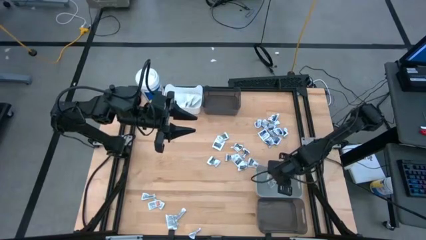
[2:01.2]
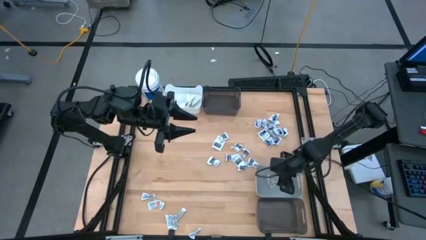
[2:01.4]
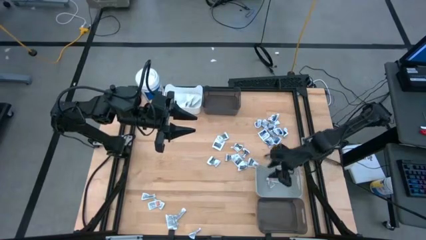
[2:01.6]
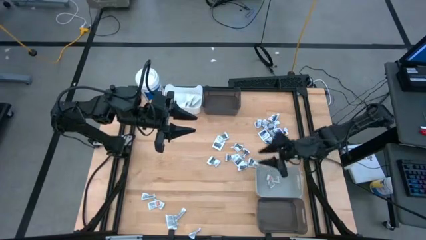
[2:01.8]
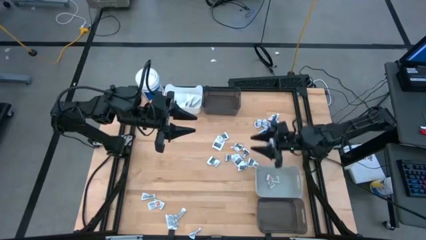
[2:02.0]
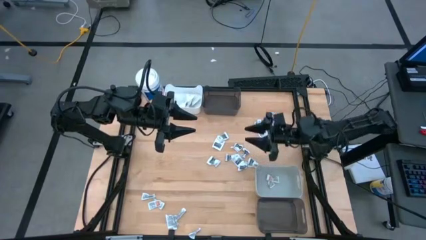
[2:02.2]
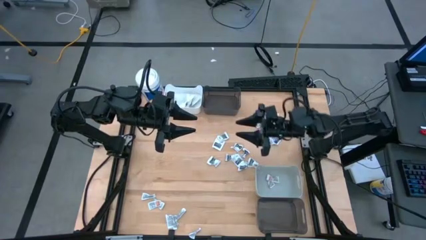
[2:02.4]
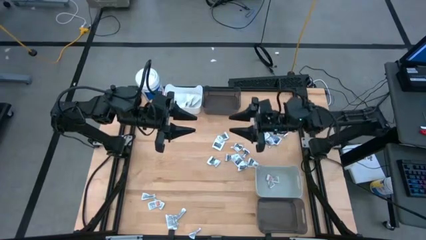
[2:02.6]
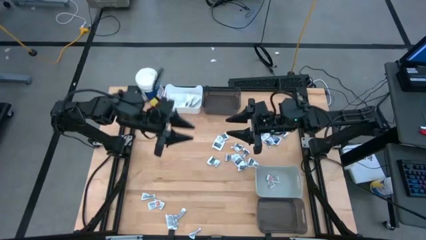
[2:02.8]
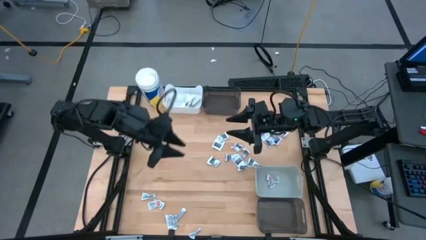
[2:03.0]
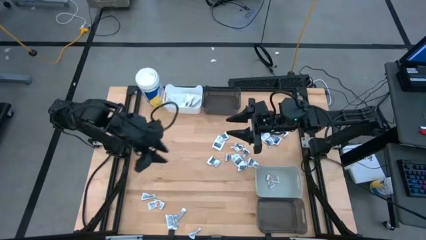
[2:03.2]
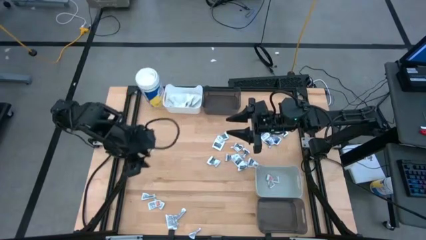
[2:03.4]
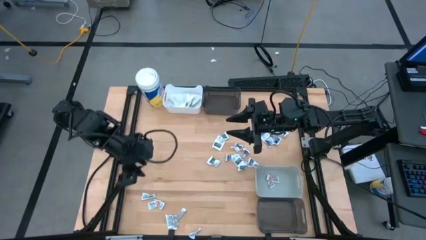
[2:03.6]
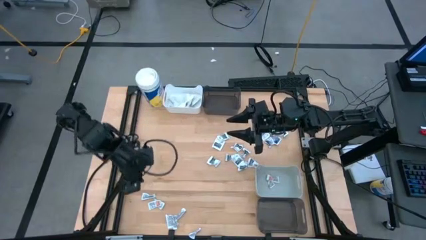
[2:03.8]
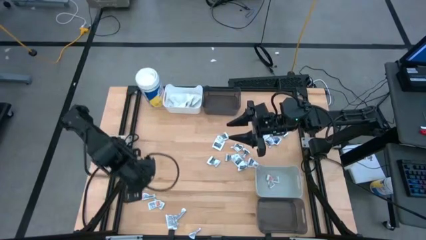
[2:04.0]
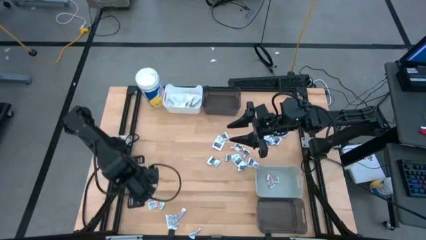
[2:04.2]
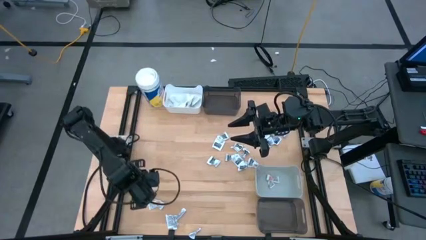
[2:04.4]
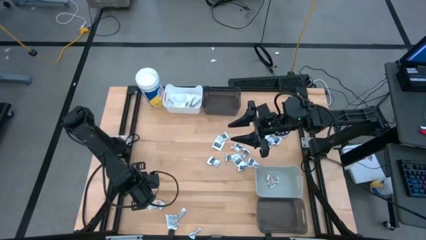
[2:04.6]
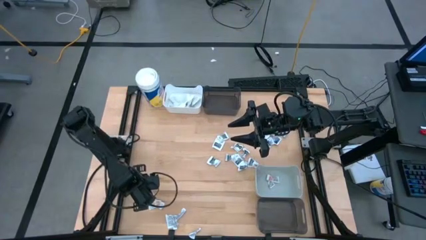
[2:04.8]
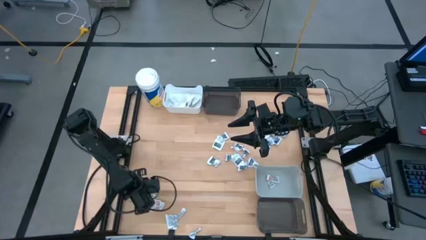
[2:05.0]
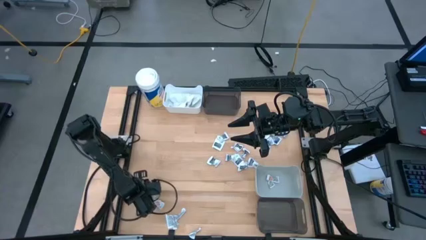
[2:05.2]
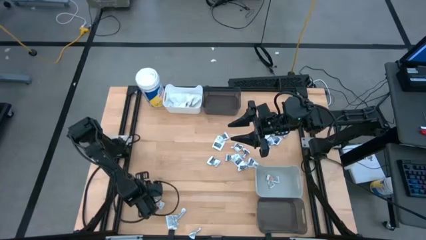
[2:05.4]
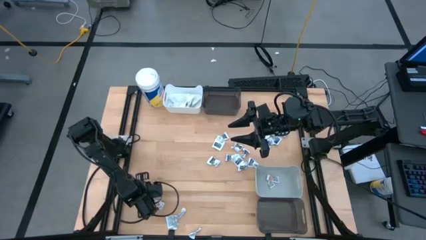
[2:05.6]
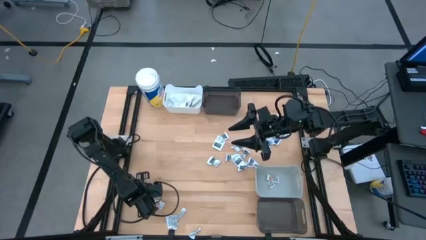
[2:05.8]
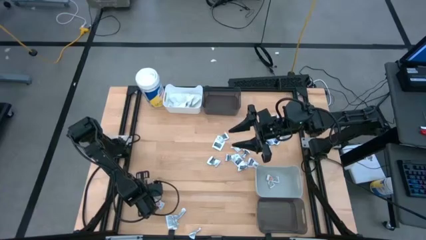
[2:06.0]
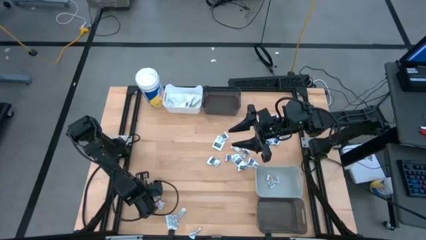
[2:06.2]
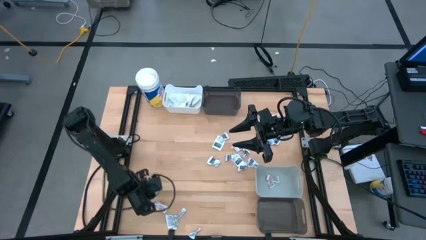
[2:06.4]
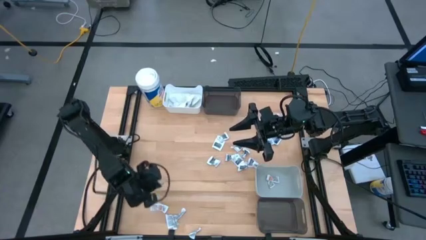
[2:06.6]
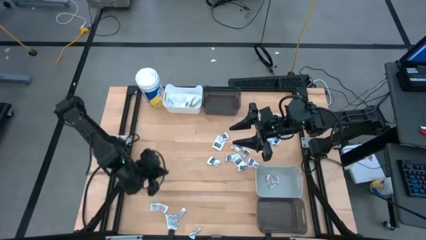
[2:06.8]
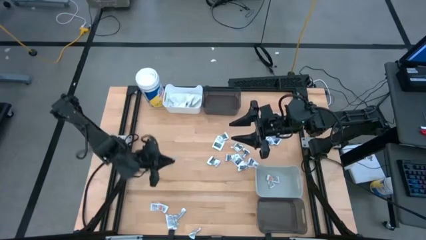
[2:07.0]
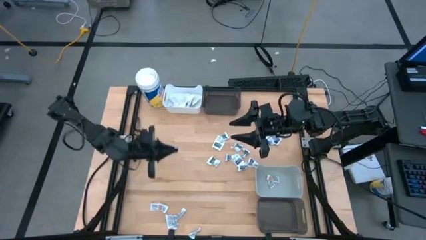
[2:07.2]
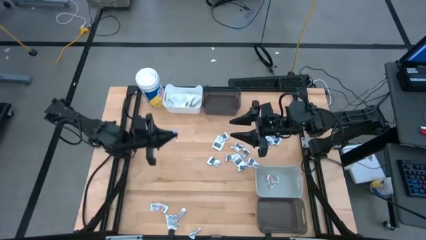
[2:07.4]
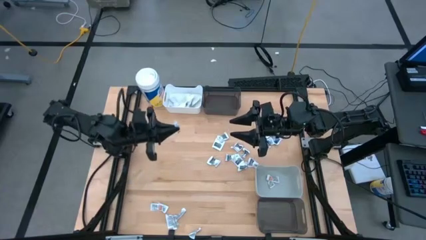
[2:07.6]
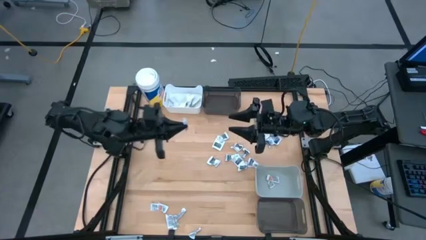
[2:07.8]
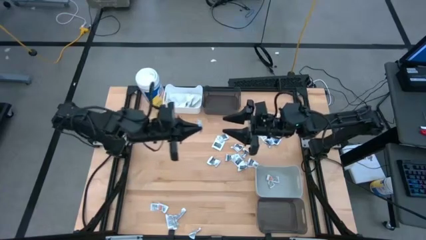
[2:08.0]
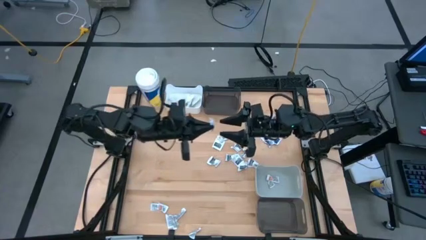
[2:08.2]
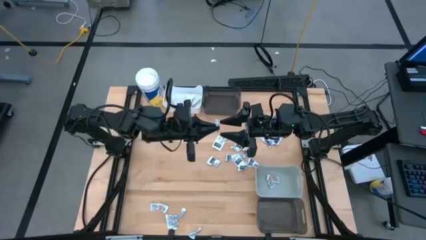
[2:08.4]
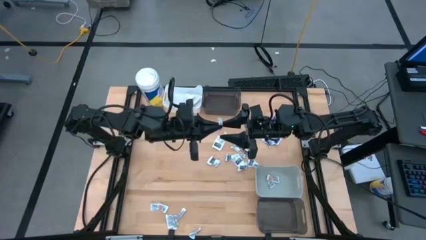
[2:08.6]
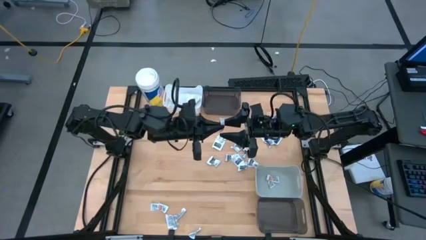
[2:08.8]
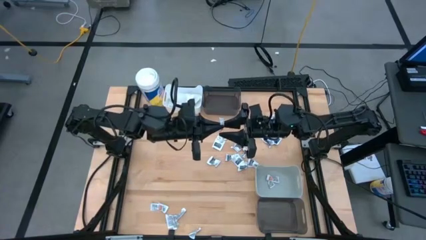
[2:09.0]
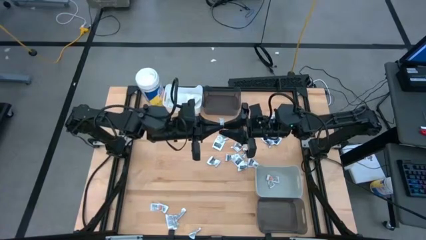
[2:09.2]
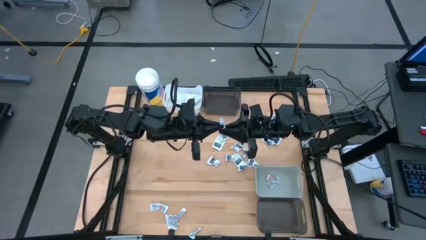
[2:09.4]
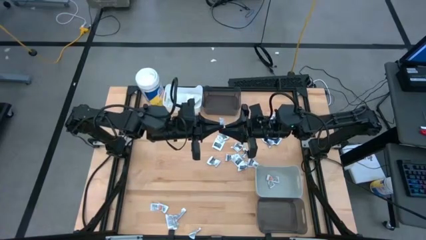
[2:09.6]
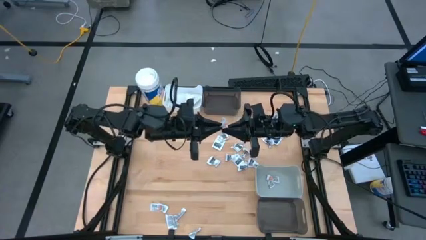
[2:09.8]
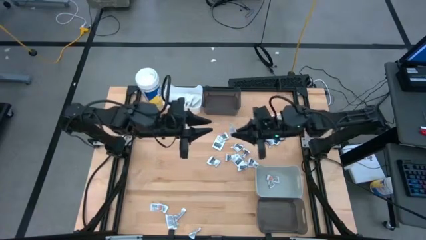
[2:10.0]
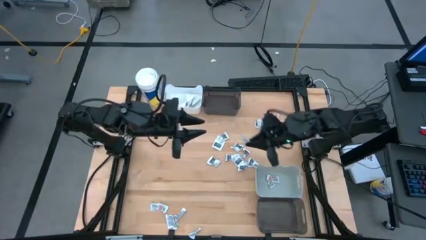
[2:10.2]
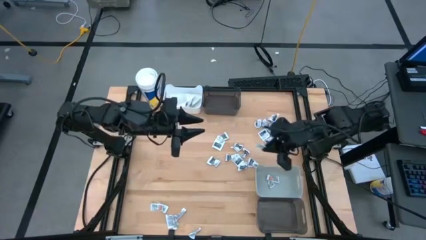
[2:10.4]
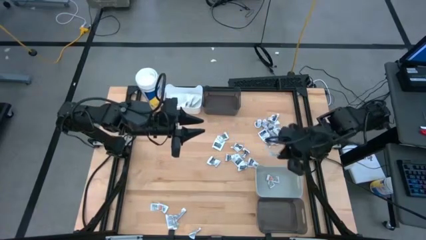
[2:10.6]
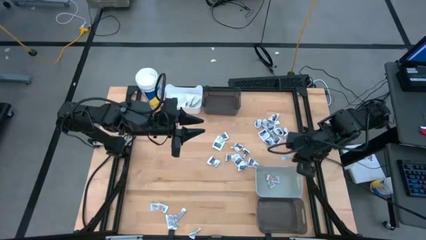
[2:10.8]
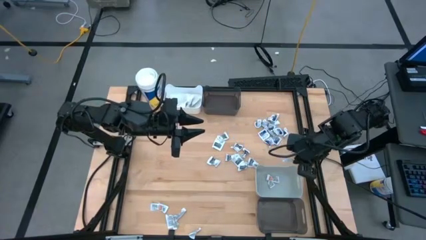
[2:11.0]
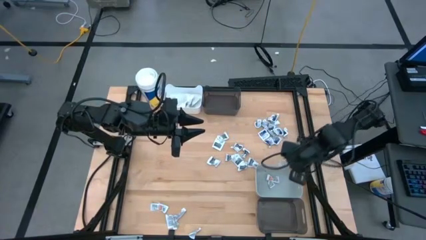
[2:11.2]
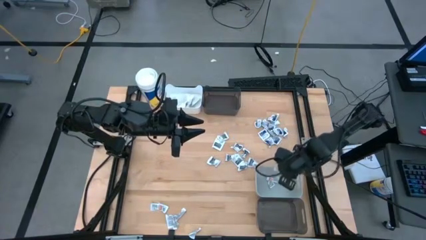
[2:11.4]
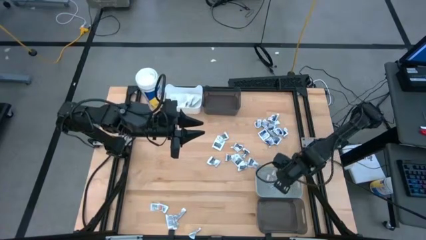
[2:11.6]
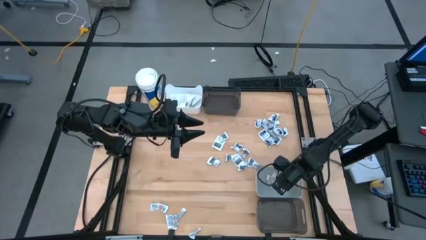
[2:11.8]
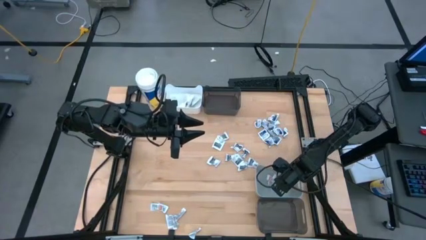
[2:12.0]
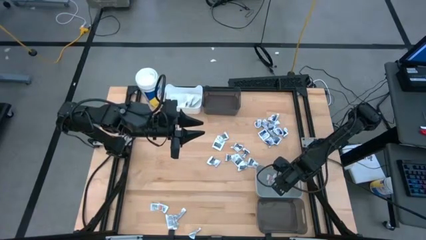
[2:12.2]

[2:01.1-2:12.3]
Task: Pick & Place First Aid Supplies
Put the orange ointment pack into the gray bin

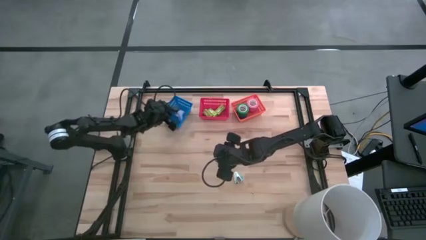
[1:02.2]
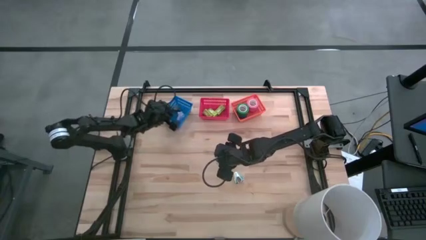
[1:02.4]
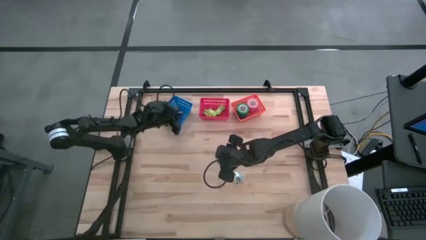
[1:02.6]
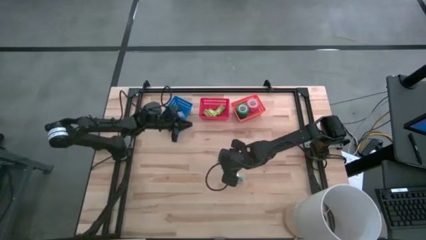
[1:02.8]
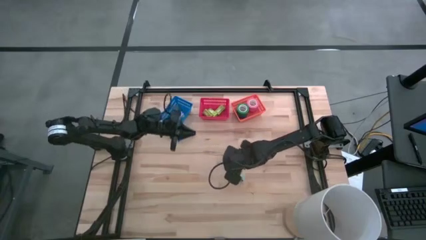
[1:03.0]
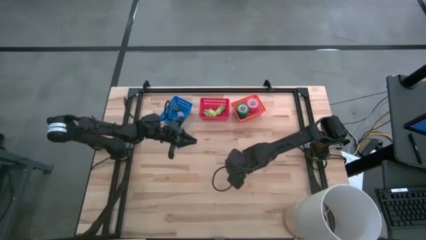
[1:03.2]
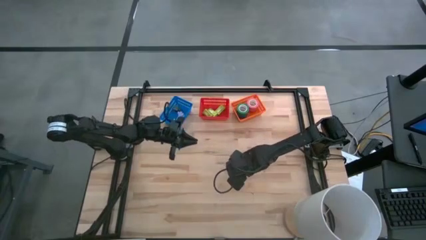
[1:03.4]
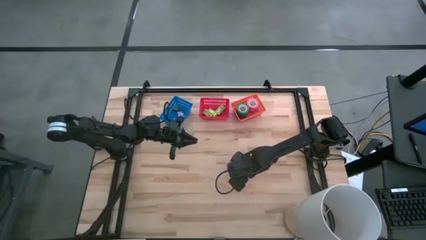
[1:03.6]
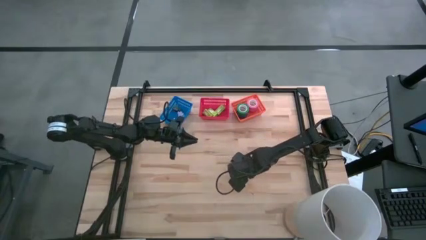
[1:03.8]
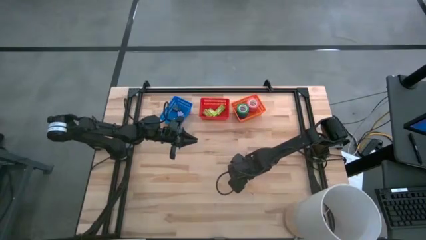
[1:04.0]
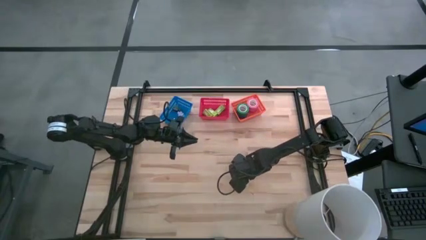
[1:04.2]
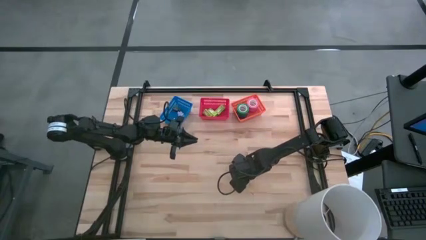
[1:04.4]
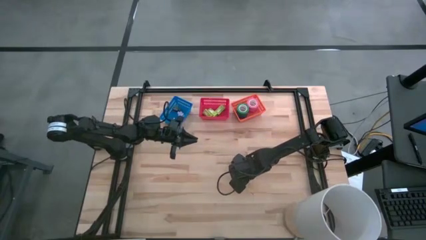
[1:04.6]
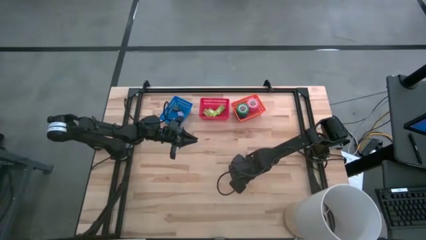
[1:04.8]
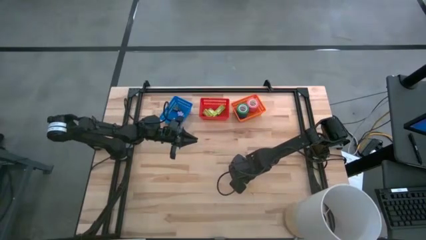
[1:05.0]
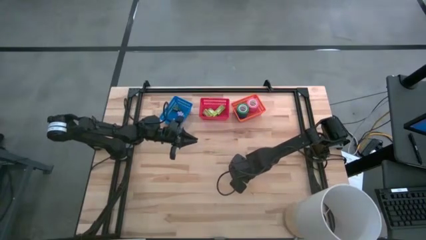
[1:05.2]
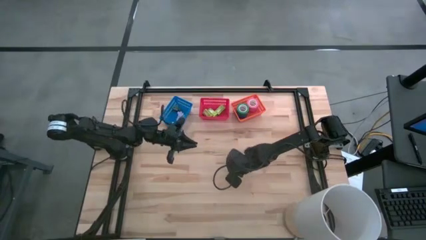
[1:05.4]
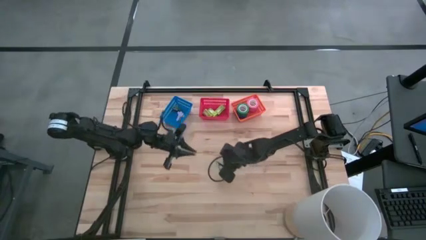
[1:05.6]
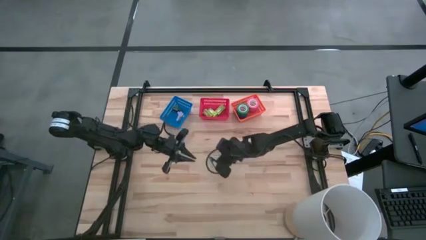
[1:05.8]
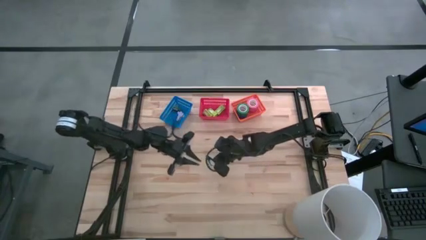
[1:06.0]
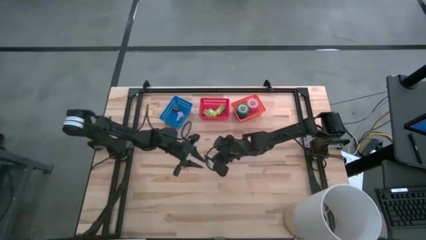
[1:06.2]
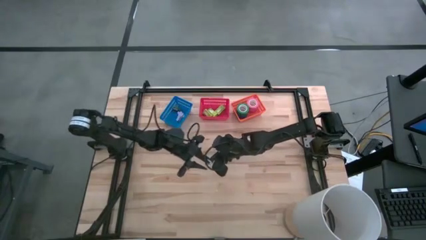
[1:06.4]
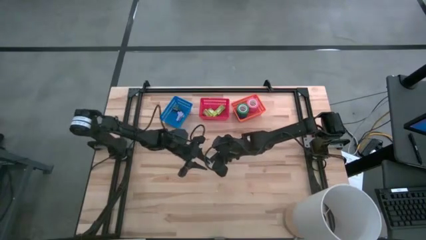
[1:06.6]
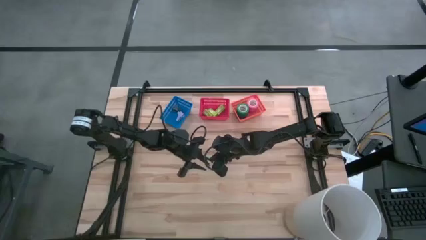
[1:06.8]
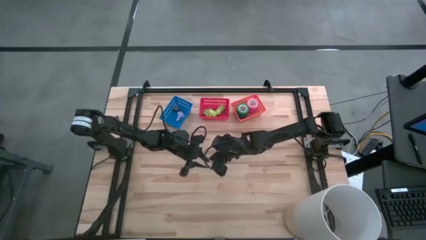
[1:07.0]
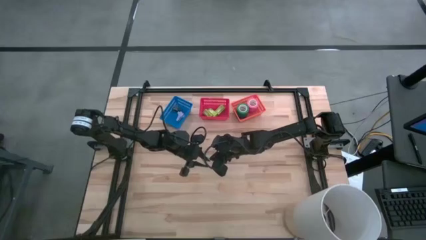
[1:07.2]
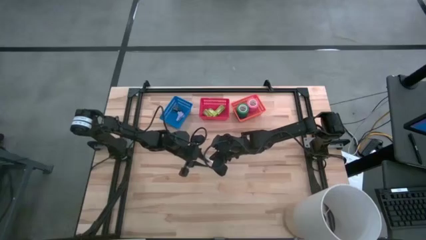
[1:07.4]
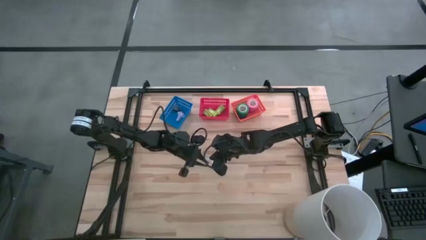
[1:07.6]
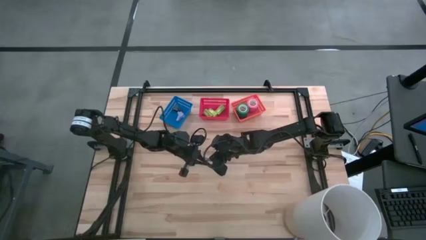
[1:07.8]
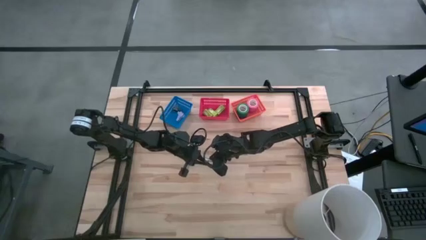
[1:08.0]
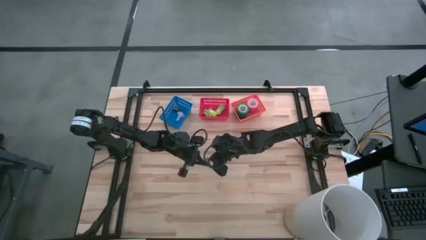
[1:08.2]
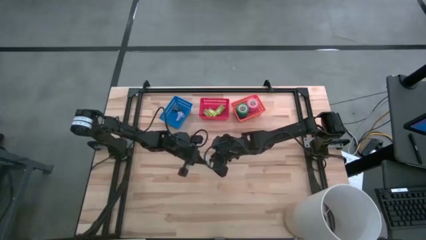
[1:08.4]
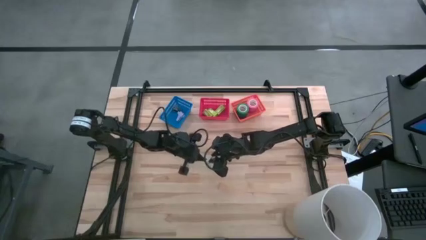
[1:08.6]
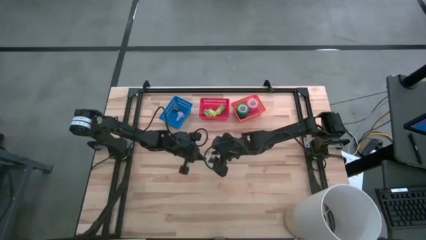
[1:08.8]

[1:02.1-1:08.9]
Task: Pick and place Stapler, Stapler remover, tape
Put the blue staple remover into the blue bin
